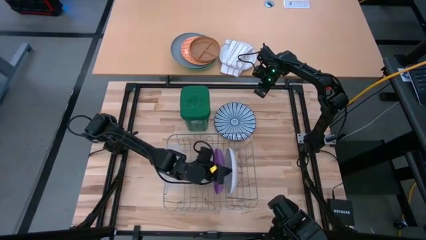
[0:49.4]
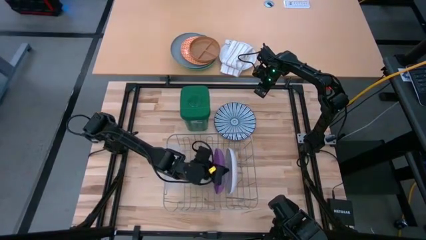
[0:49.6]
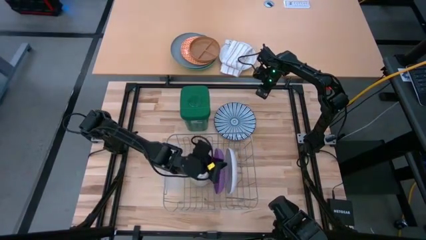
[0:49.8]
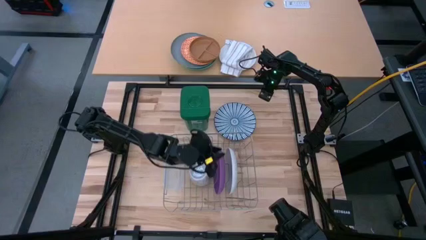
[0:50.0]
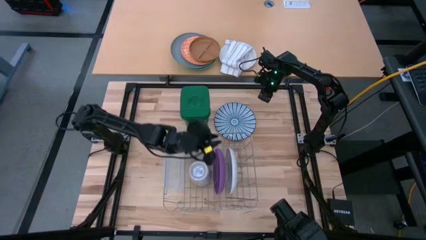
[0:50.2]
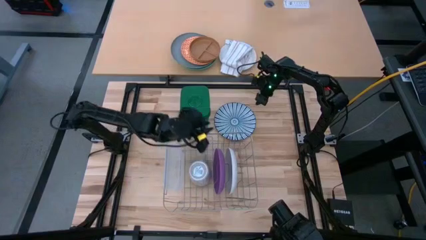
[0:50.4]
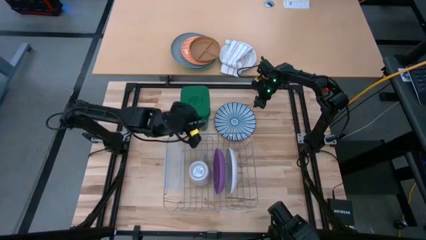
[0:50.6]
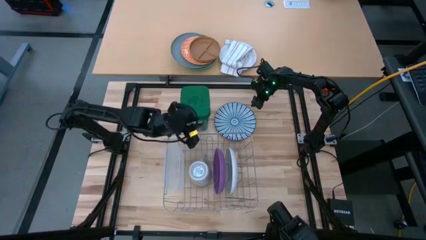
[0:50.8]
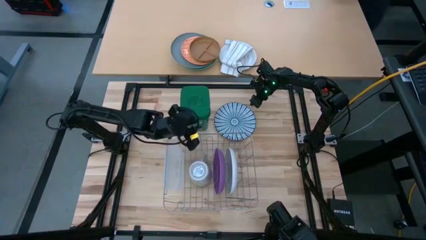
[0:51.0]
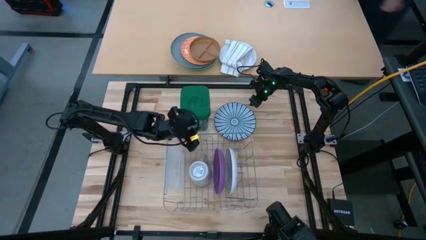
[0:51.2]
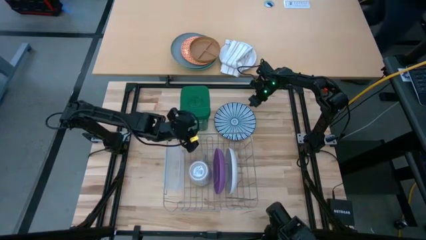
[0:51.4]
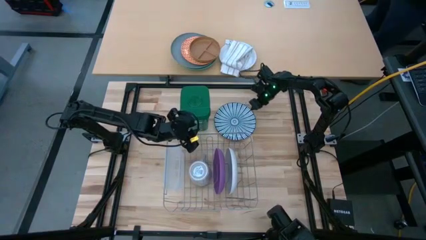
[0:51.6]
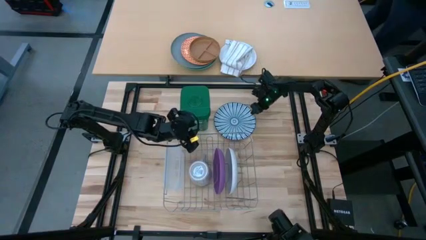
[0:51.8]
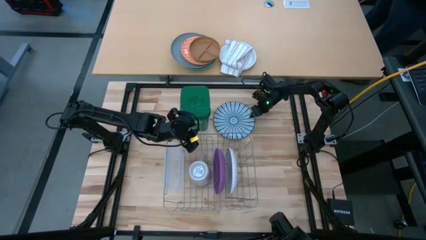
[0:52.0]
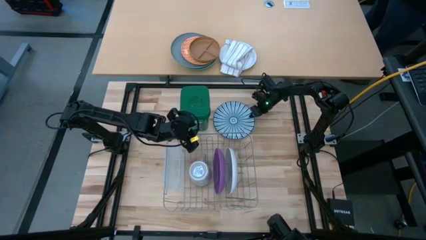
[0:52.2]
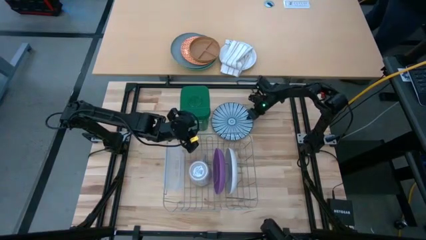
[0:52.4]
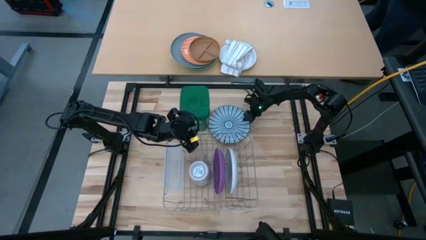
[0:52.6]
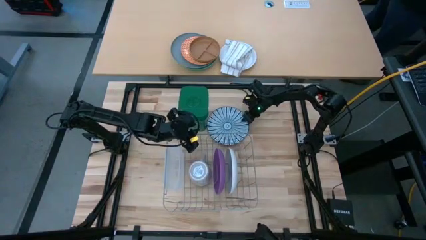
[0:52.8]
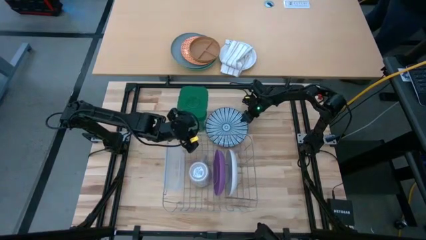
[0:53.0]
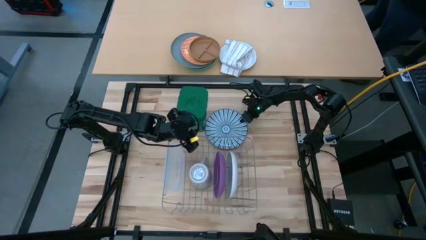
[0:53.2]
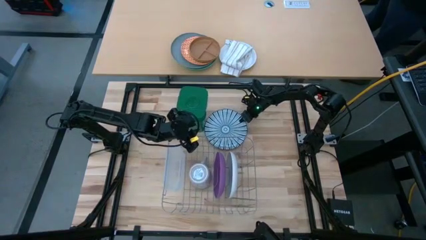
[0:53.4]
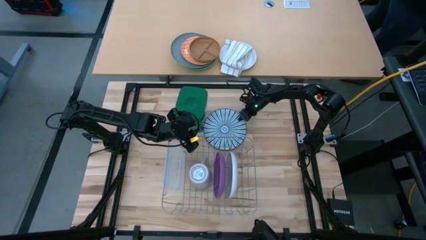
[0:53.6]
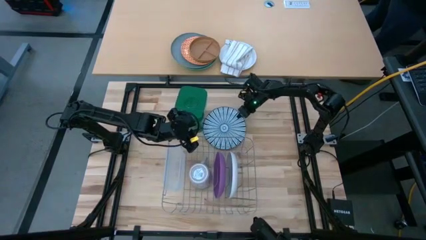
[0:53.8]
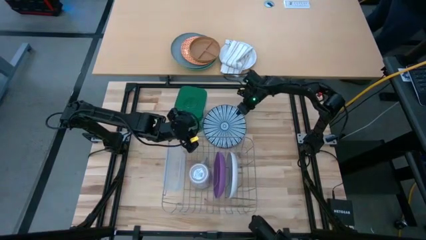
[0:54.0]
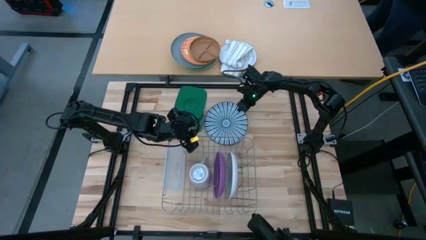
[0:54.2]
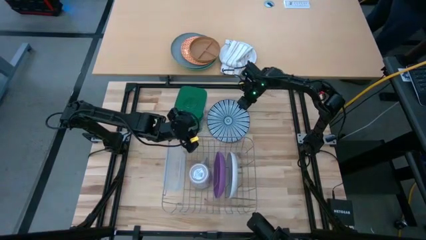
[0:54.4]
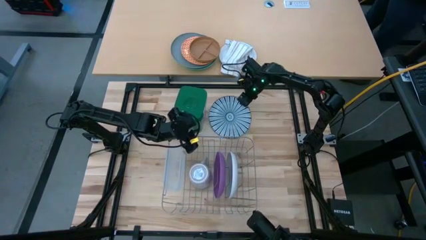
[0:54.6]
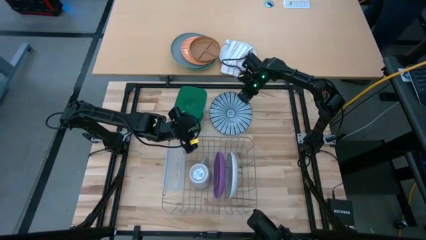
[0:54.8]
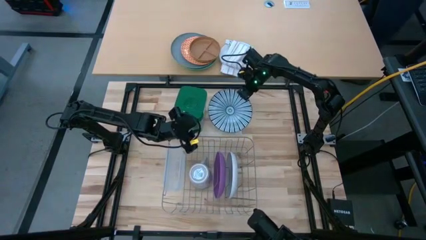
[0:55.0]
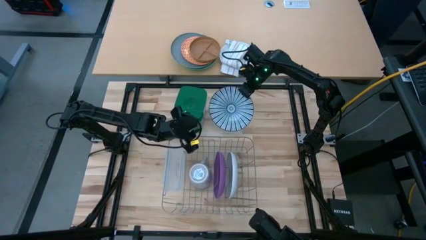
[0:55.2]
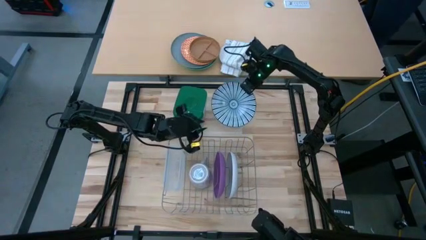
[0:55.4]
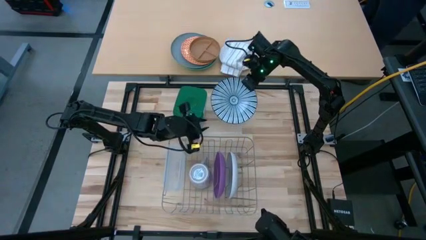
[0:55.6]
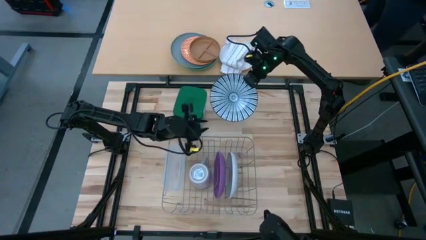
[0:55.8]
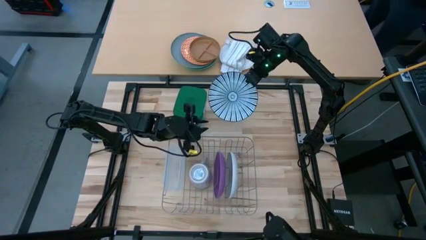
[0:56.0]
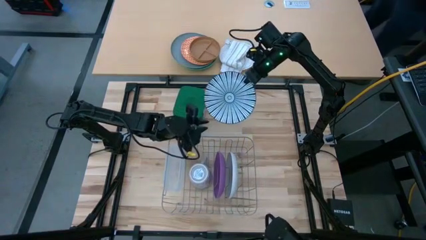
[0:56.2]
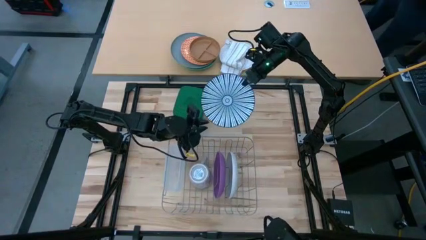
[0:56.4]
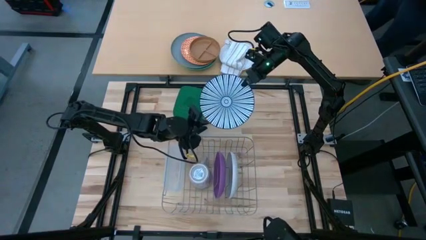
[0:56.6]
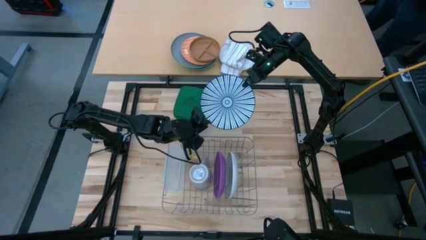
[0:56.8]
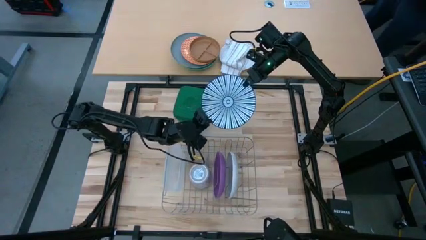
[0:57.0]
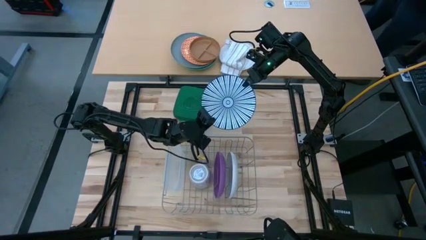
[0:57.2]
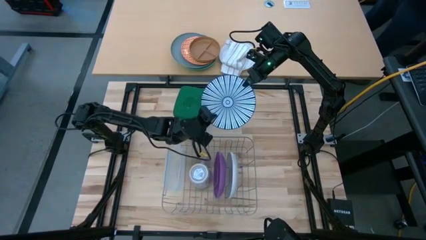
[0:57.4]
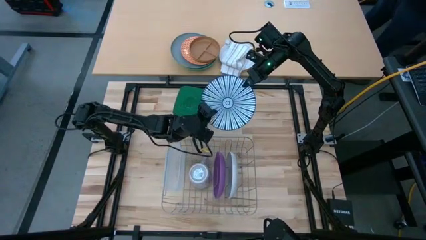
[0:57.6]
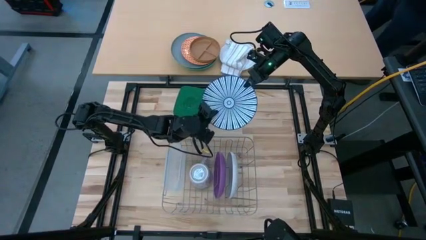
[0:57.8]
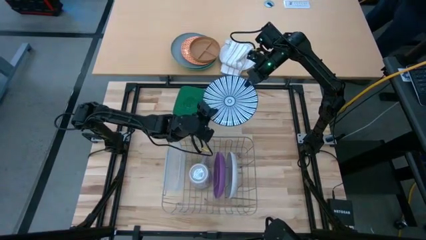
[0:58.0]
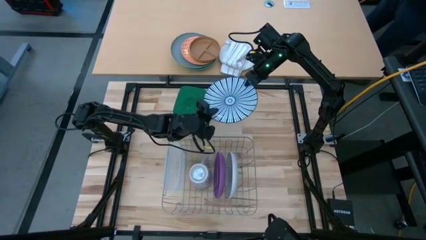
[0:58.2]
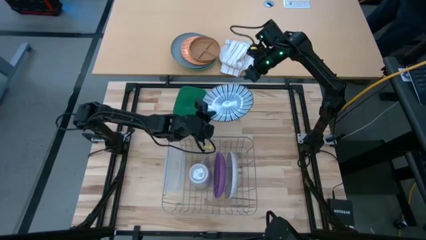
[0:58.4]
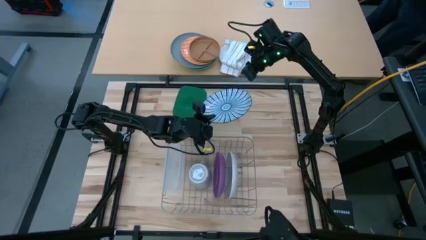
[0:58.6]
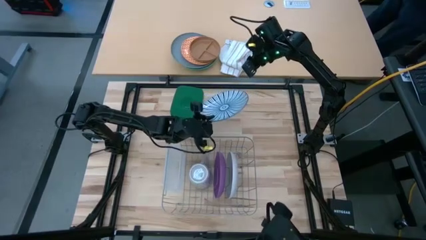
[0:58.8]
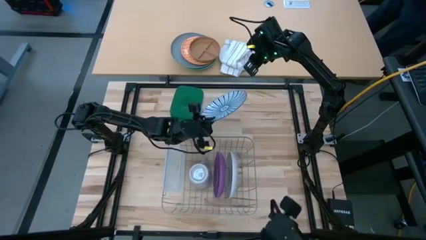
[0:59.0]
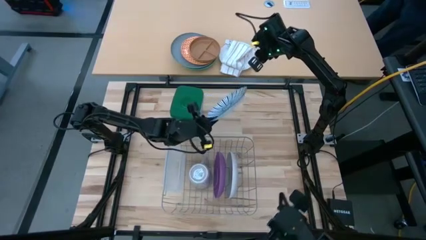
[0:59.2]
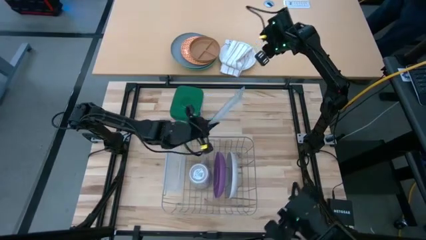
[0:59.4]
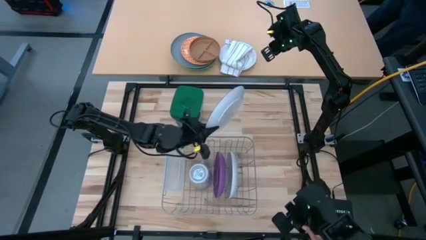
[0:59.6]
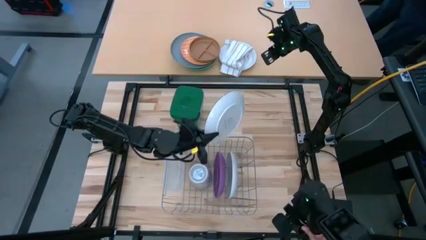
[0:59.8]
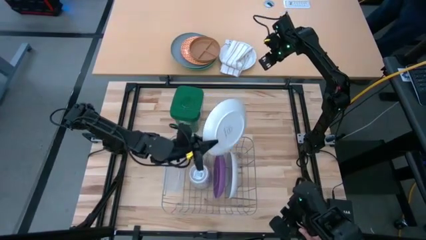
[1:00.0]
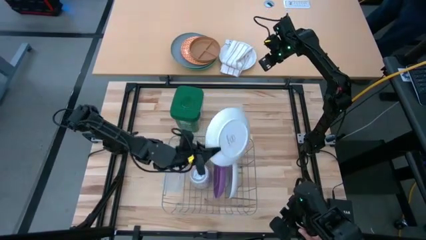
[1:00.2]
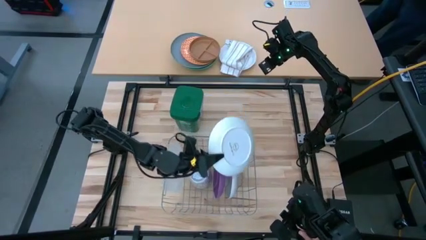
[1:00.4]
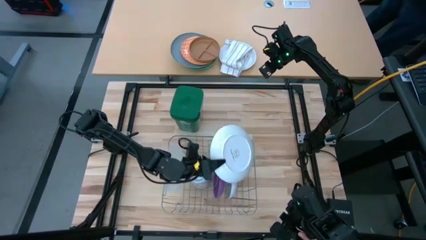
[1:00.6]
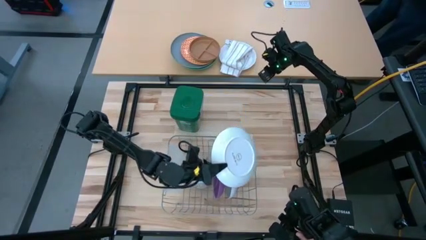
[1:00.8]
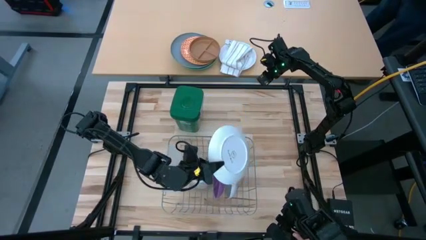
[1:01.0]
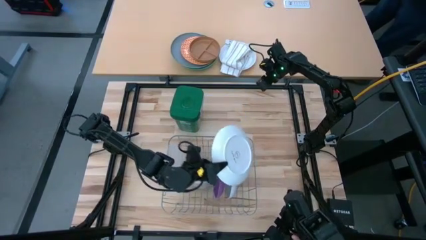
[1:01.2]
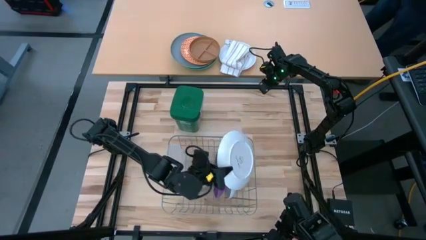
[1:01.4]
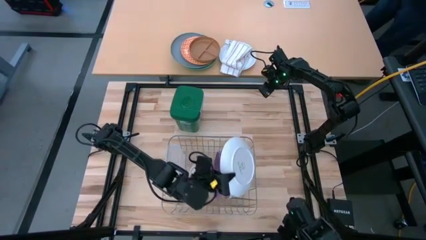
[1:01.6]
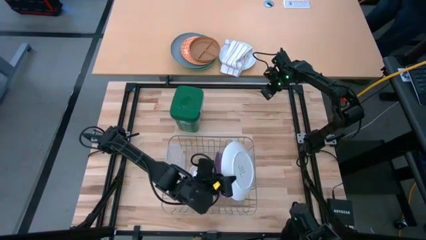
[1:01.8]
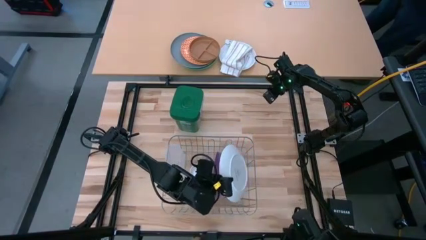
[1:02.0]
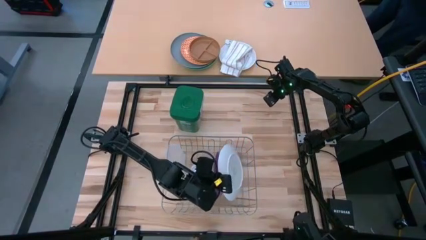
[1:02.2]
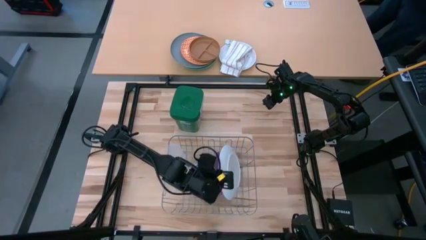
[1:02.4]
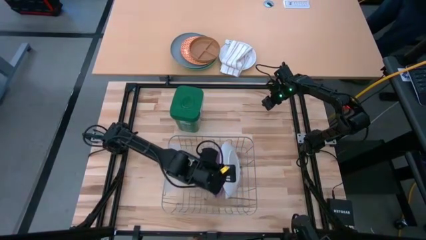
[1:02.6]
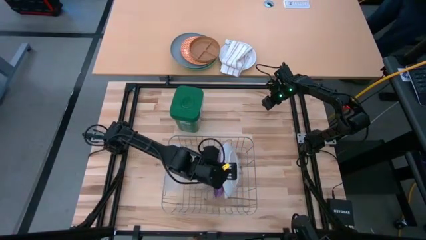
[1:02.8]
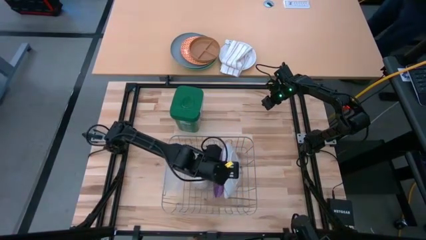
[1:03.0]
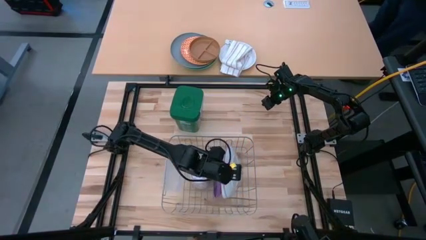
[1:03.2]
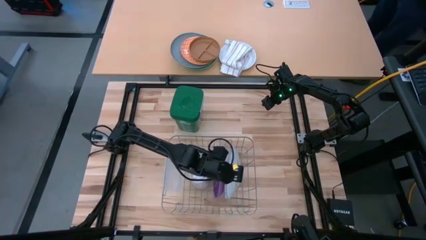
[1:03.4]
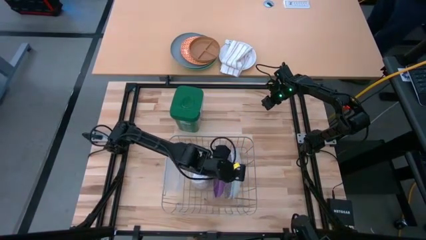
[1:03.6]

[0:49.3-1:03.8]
Task: Sort dishes
Put the blue plate into the dish rack

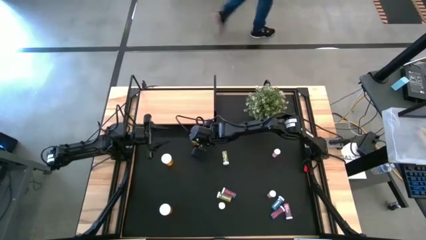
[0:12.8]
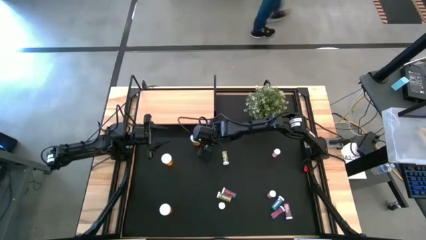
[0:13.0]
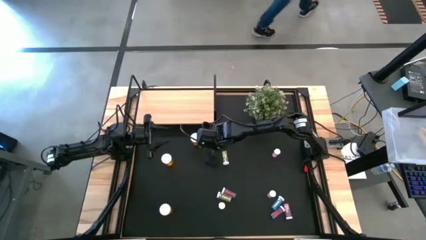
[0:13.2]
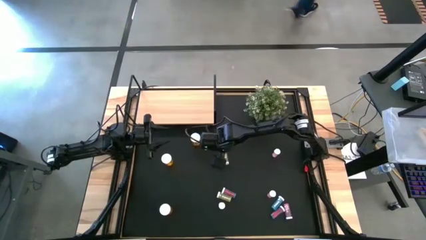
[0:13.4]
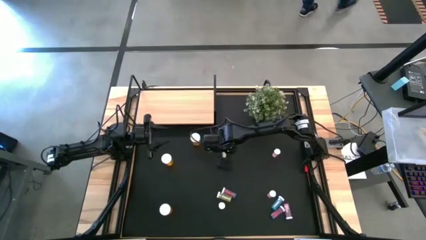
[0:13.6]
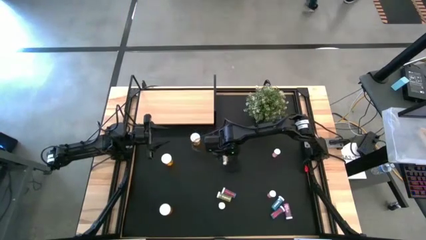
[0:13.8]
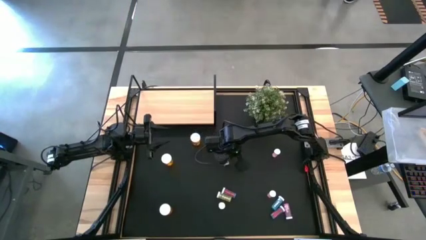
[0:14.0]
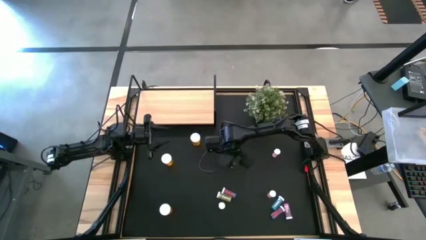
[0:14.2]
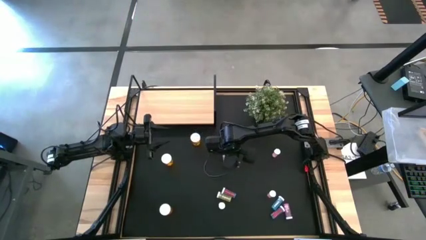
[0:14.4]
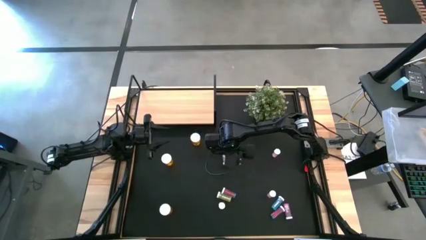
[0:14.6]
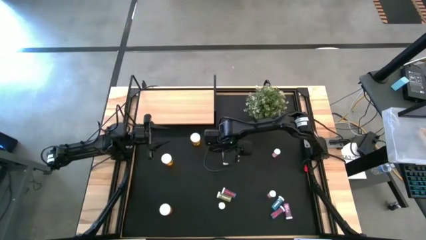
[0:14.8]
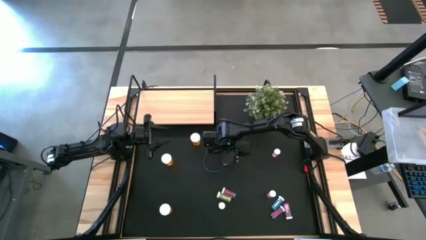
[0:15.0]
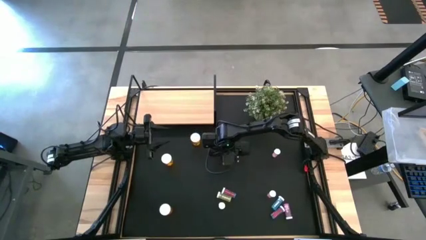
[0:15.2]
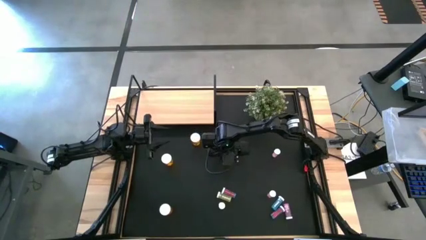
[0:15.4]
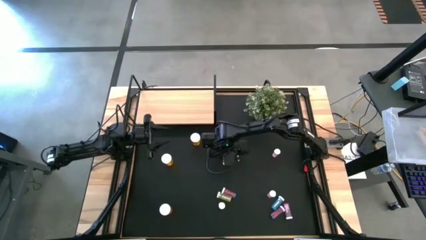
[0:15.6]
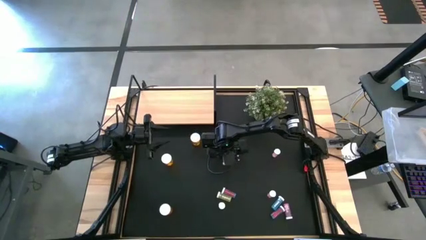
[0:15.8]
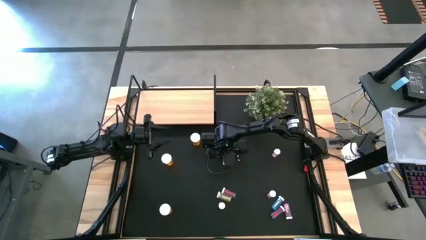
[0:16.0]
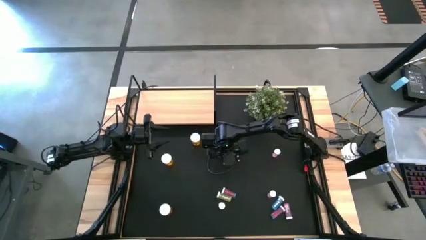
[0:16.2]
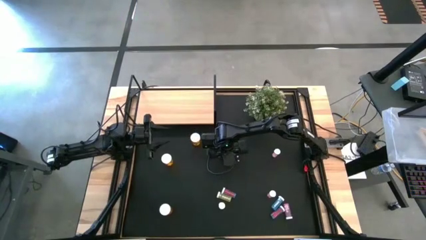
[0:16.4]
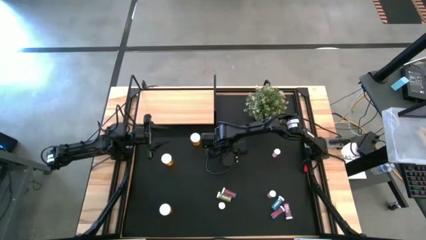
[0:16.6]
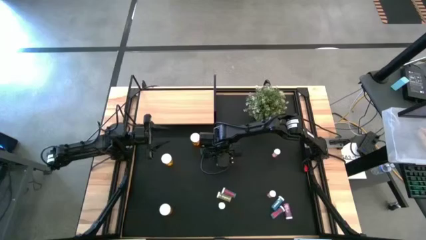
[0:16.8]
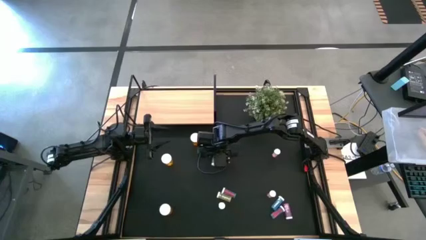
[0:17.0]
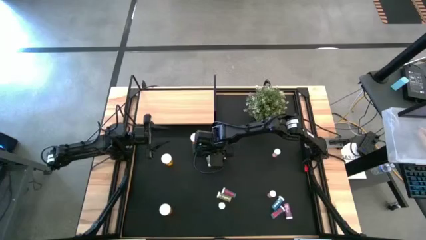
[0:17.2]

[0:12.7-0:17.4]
Task: Pick and place medicine bottles onto shelf by color
Adjust the top yellow medicine bottle
